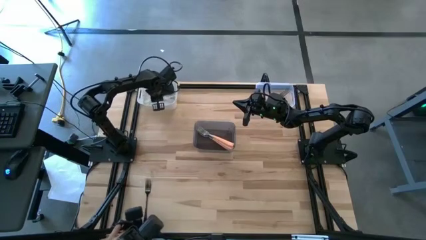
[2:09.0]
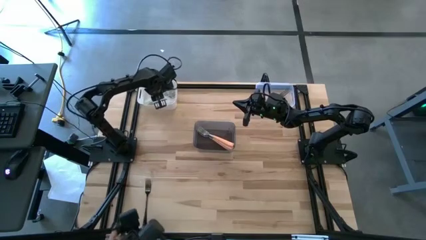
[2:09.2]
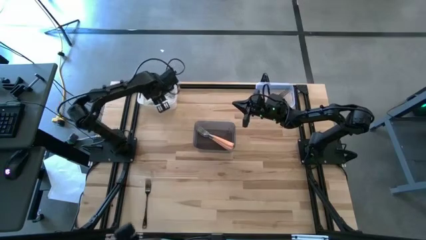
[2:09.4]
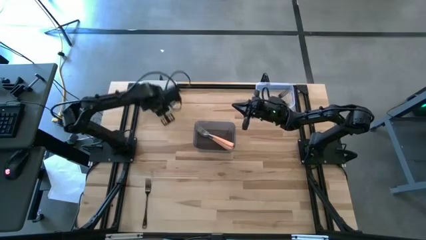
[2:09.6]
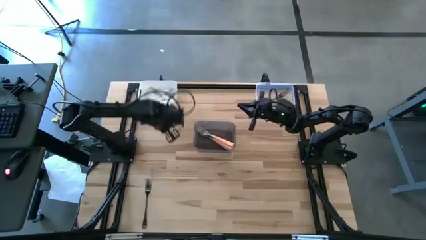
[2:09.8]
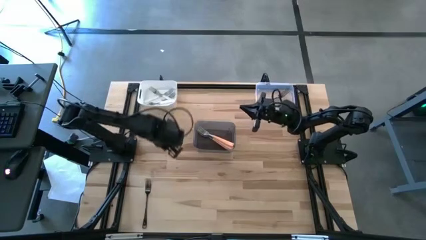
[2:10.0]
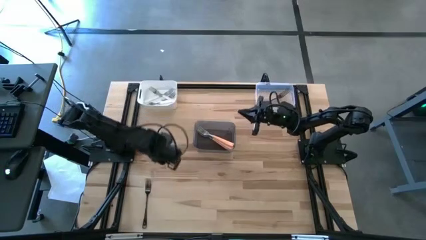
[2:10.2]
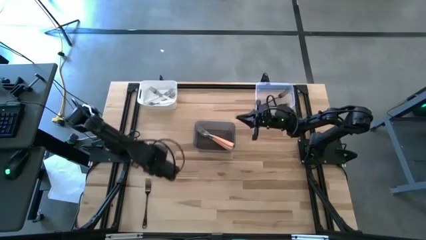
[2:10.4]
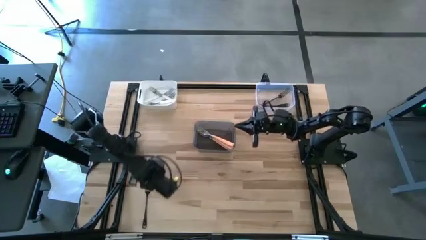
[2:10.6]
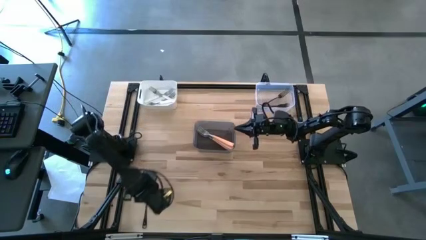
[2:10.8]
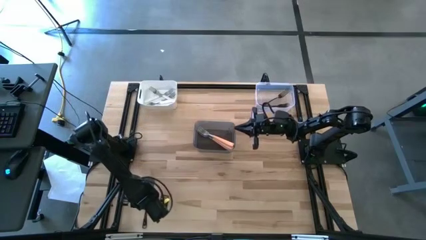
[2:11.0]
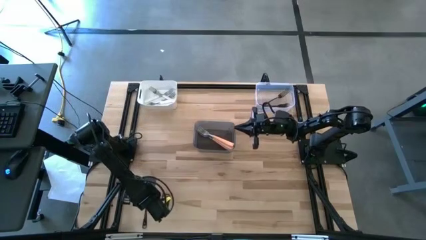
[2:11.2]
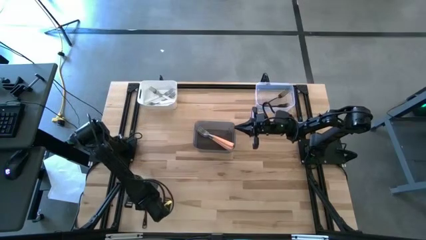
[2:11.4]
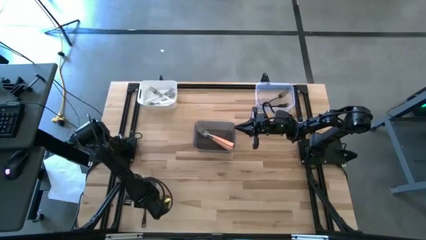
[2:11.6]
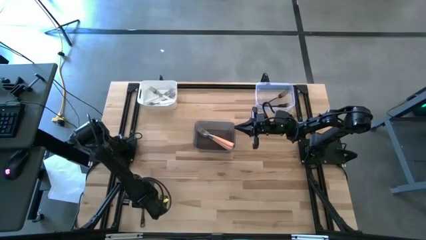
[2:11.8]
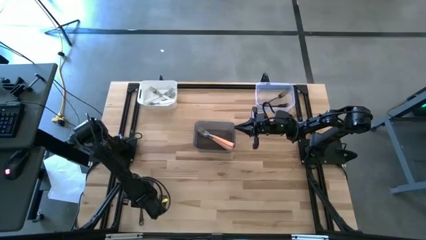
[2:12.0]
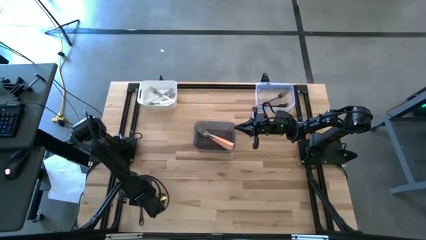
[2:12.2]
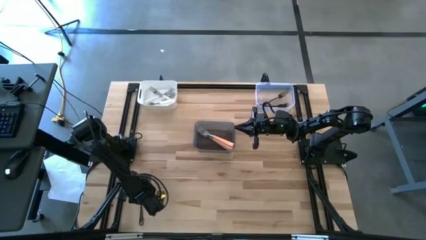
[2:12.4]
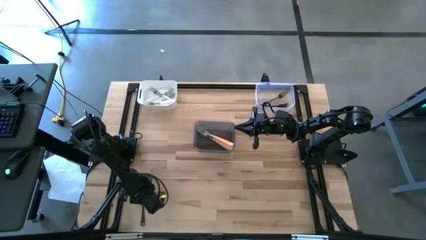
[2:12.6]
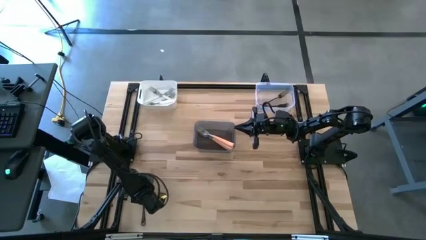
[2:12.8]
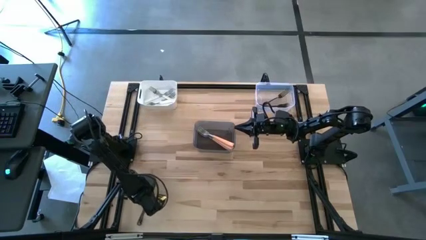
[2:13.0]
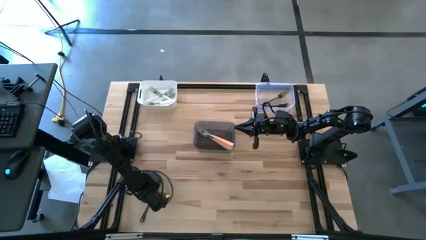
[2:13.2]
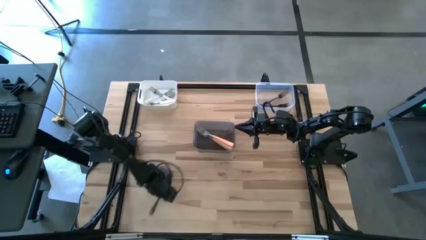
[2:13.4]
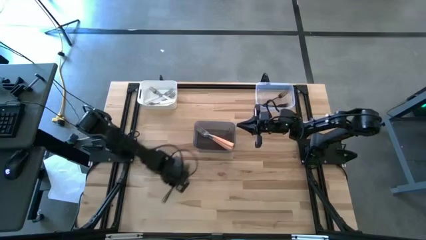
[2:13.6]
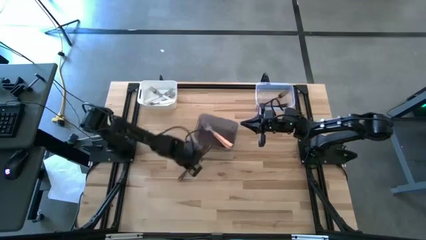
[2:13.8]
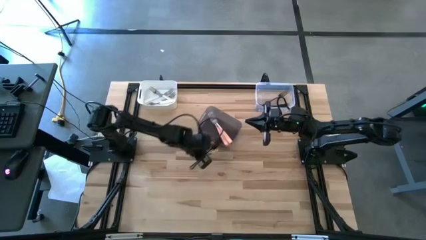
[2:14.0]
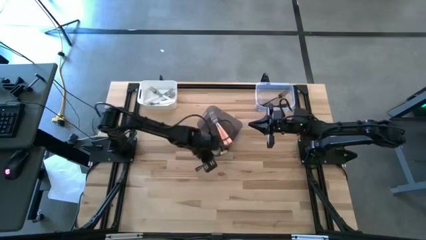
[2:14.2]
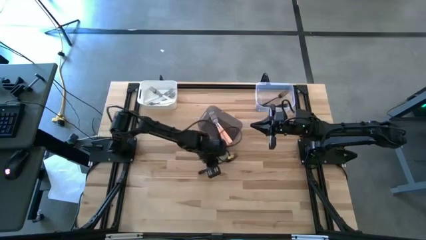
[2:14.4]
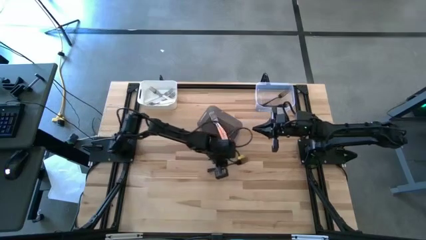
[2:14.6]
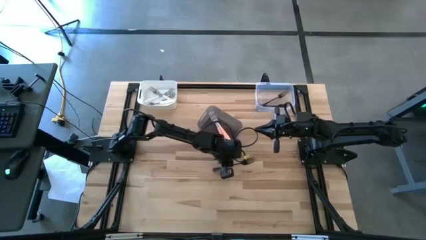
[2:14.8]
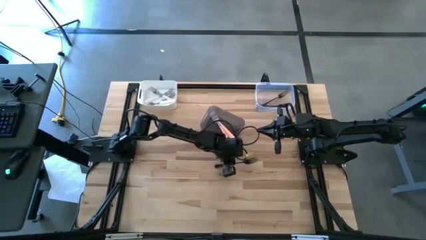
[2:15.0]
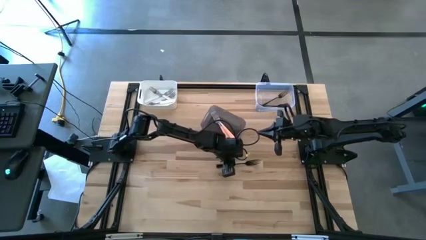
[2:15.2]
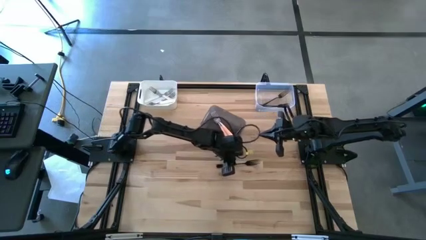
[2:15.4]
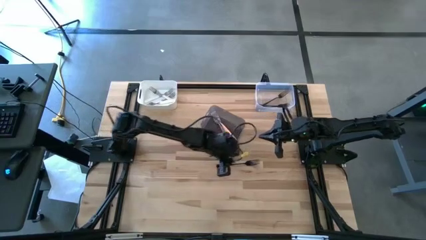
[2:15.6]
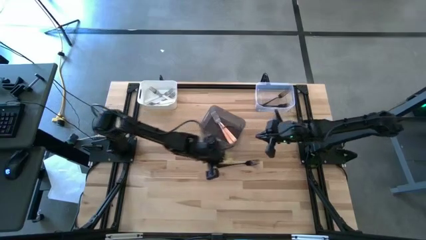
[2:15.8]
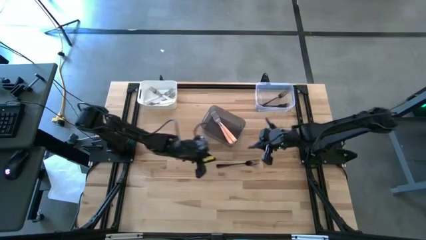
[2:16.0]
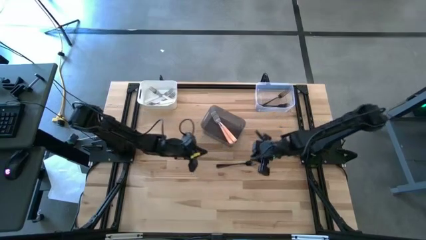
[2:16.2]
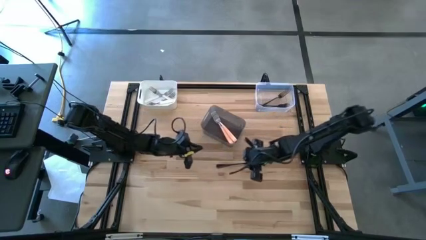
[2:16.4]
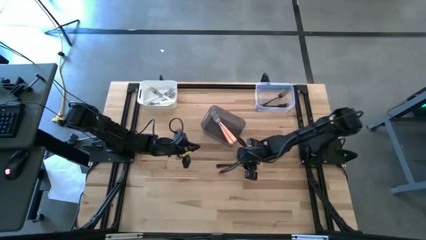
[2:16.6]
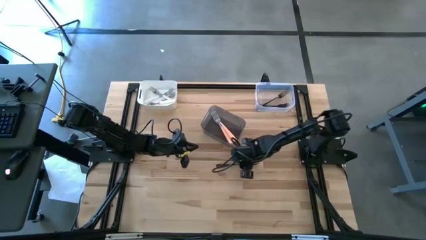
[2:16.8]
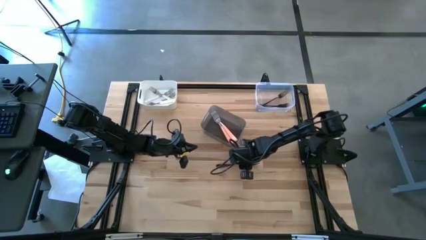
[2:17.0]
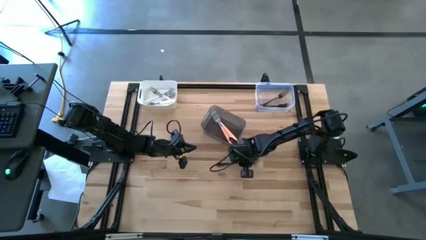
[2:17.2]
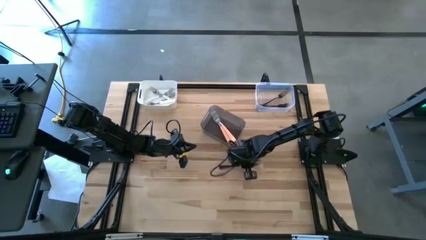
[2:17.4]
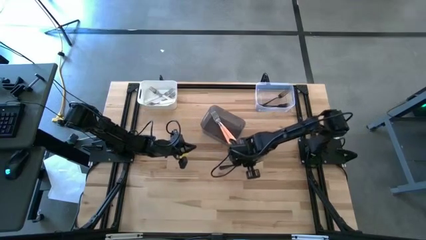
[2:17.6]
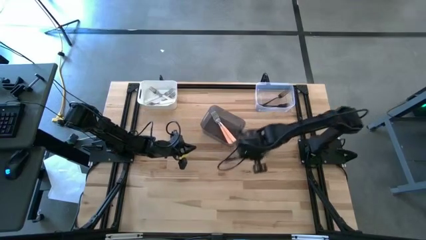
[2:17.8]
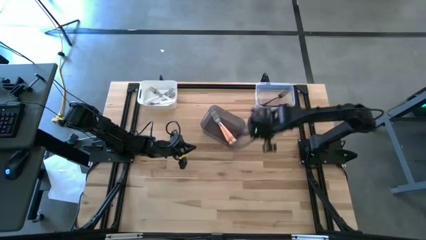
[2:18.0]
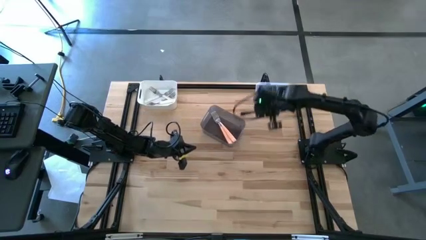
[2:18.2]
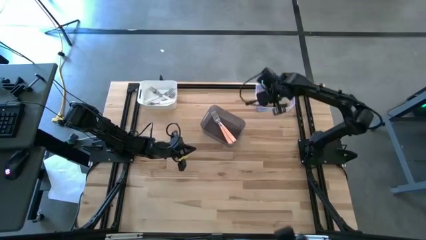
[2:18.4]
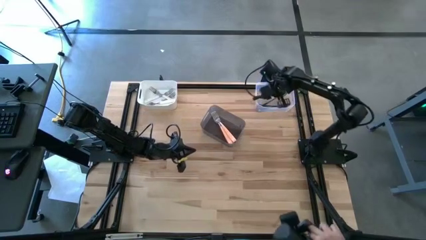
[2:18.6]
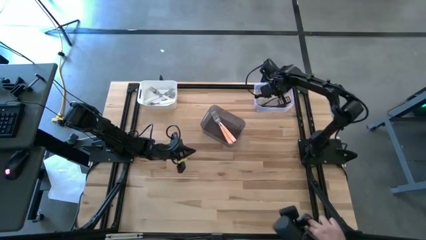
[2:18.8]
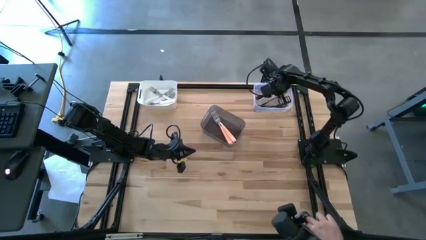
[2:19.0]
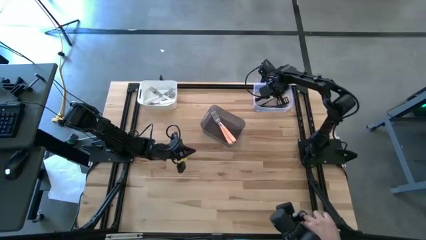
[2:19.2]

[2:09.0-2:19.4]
Task: Sort silverware by color (type)
Put the black fork into the transparent bin
